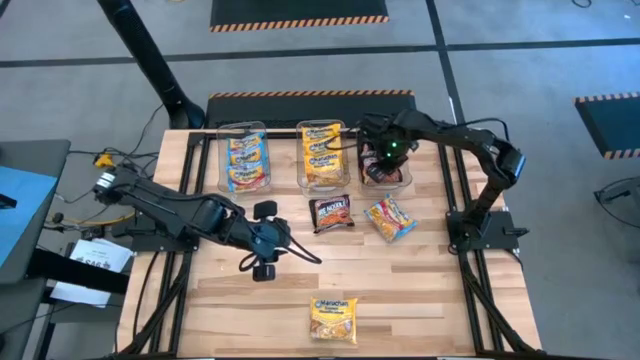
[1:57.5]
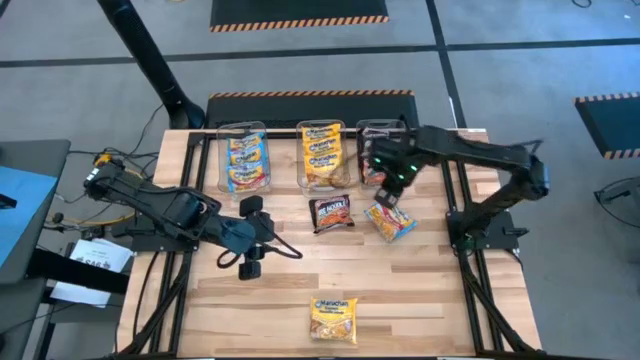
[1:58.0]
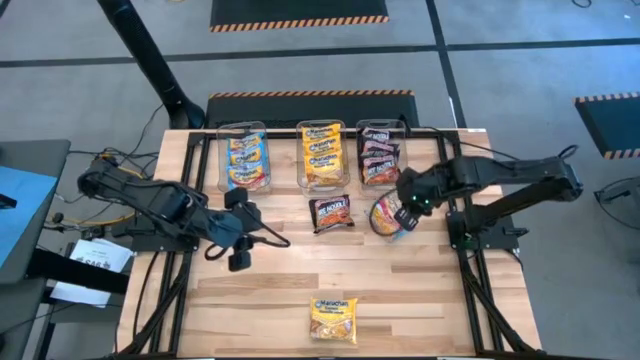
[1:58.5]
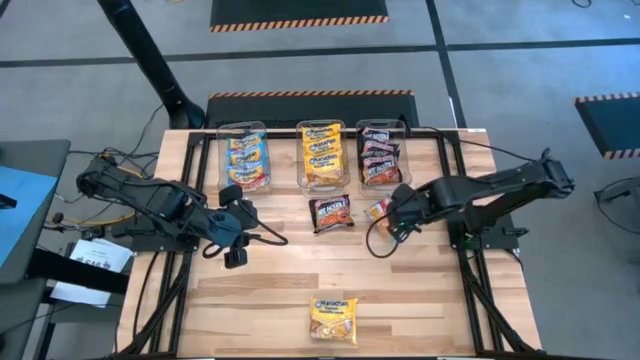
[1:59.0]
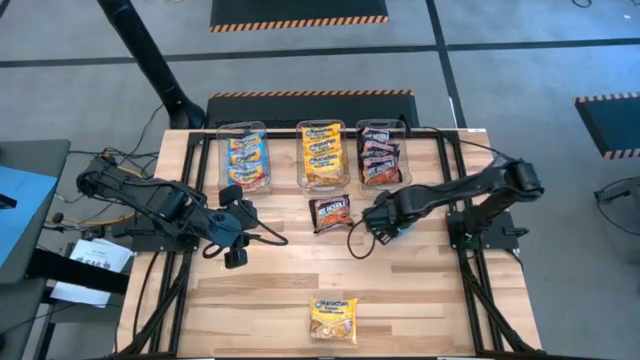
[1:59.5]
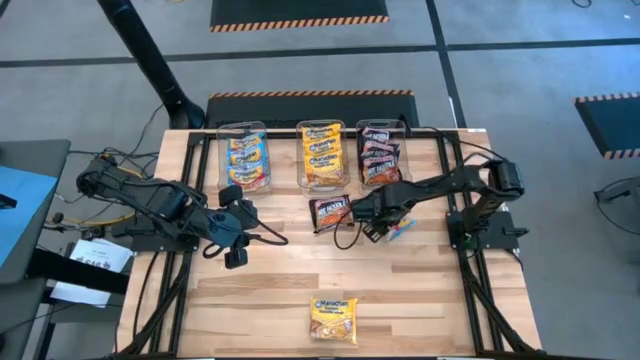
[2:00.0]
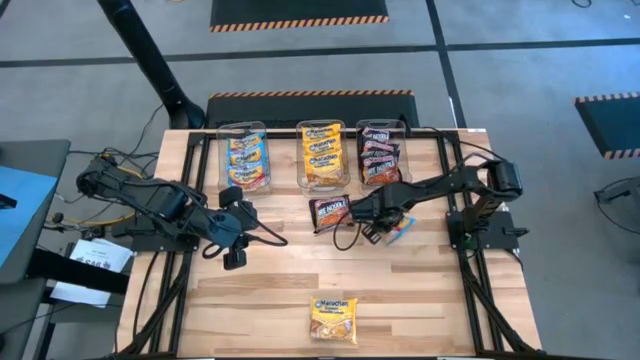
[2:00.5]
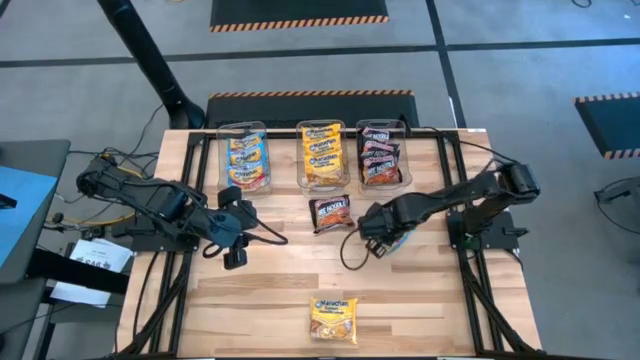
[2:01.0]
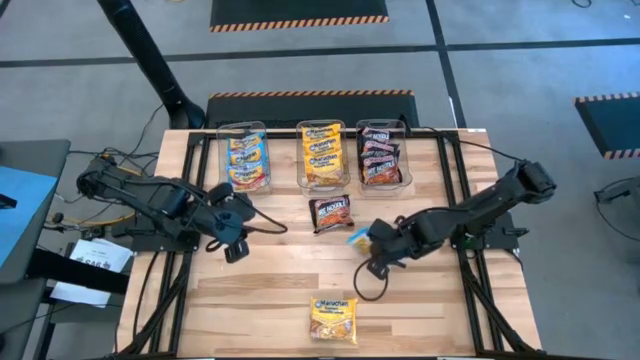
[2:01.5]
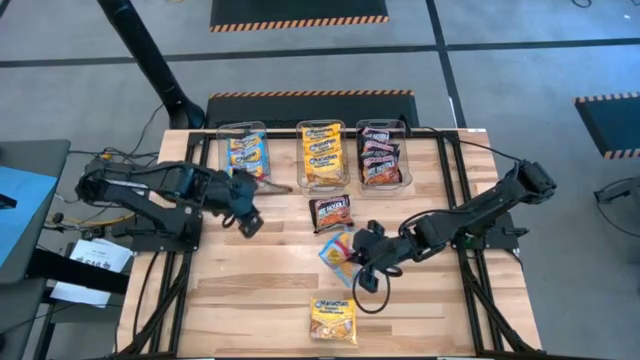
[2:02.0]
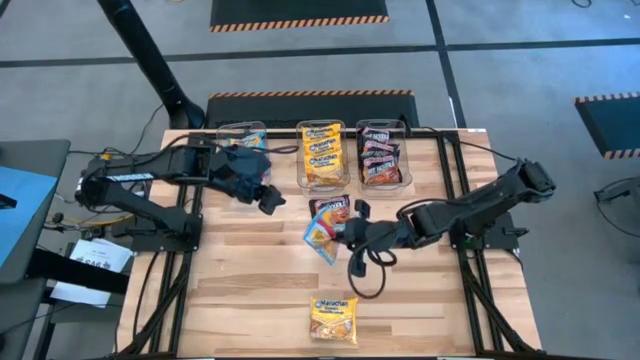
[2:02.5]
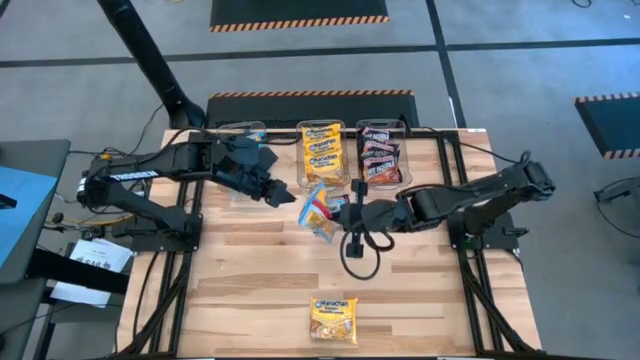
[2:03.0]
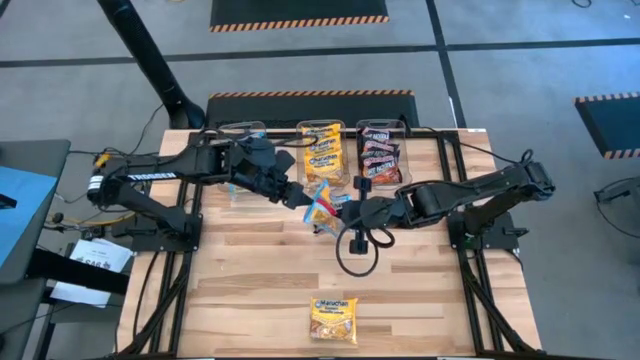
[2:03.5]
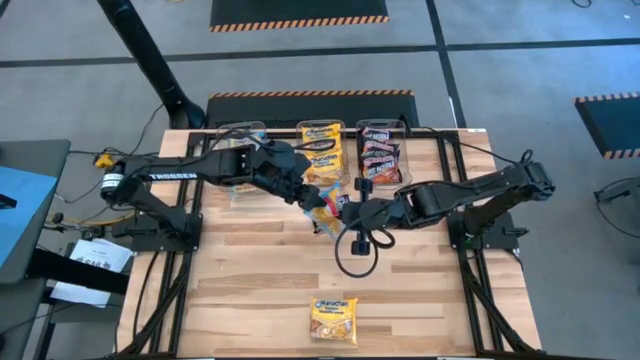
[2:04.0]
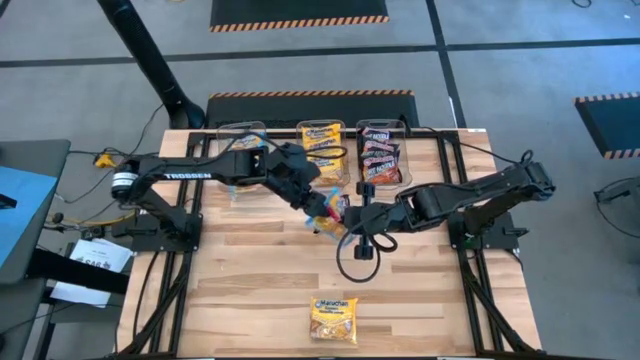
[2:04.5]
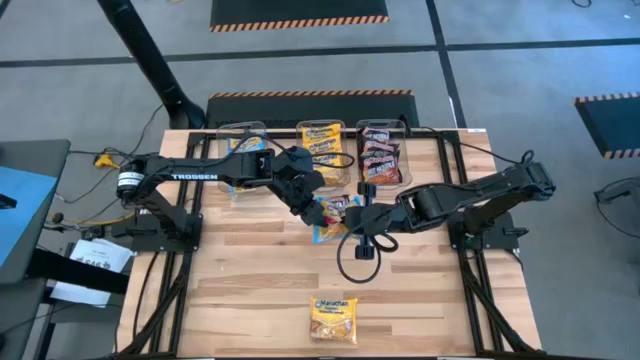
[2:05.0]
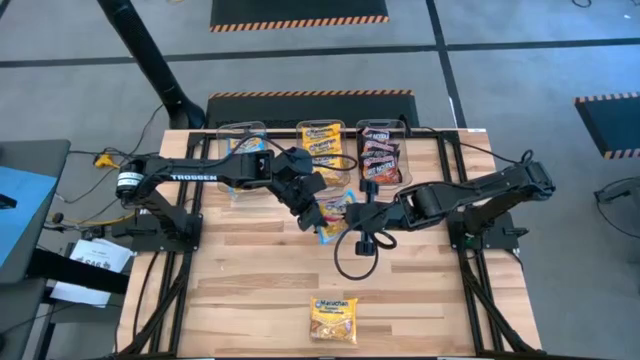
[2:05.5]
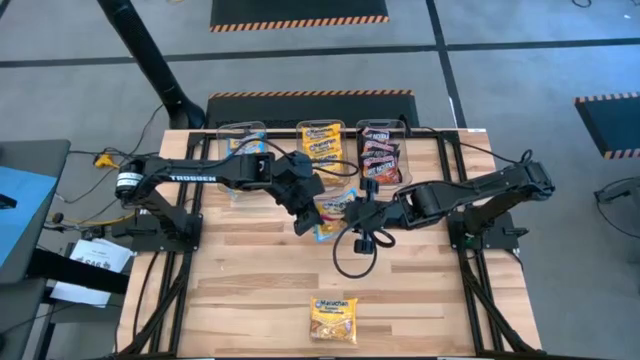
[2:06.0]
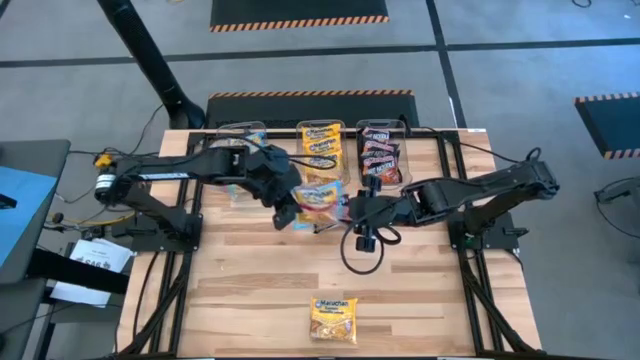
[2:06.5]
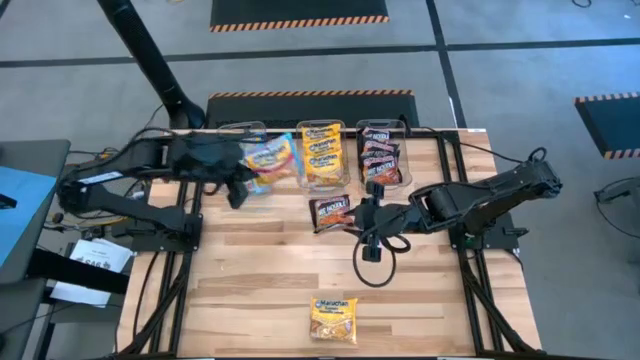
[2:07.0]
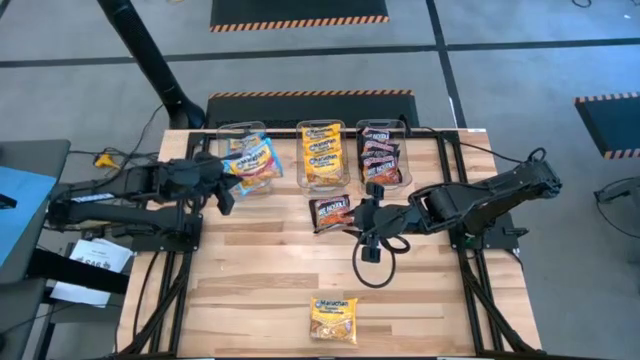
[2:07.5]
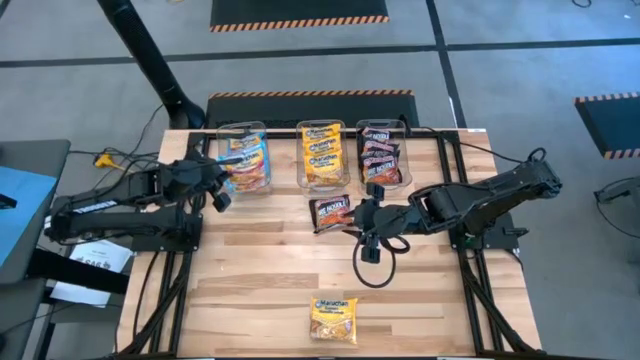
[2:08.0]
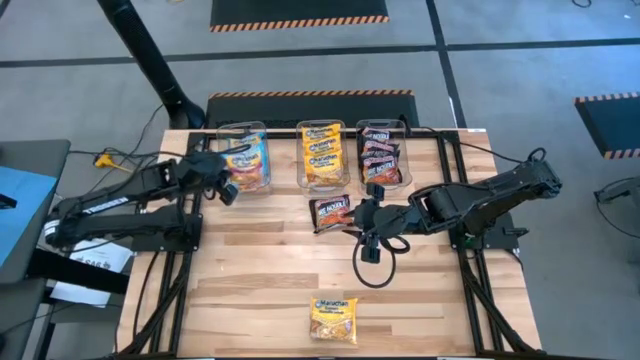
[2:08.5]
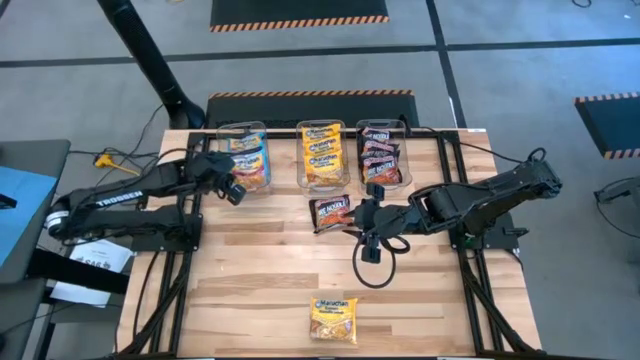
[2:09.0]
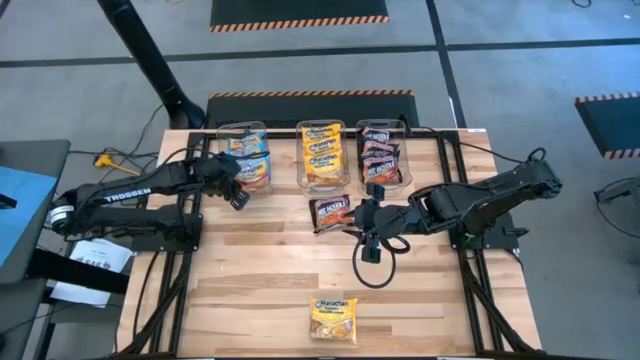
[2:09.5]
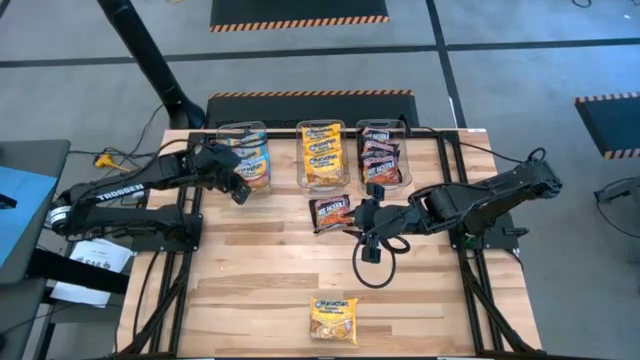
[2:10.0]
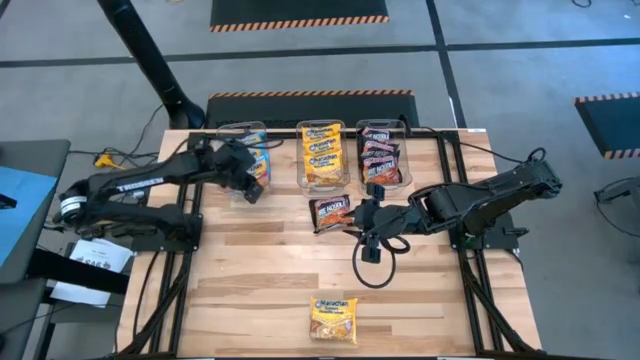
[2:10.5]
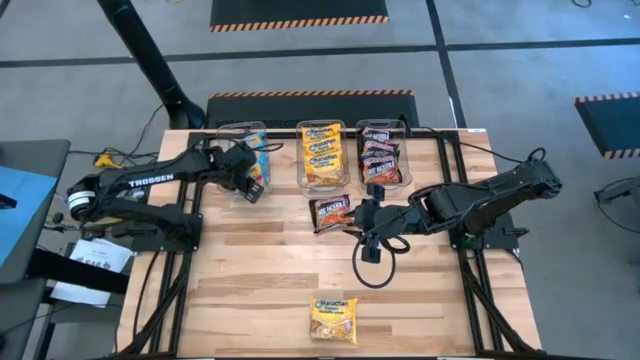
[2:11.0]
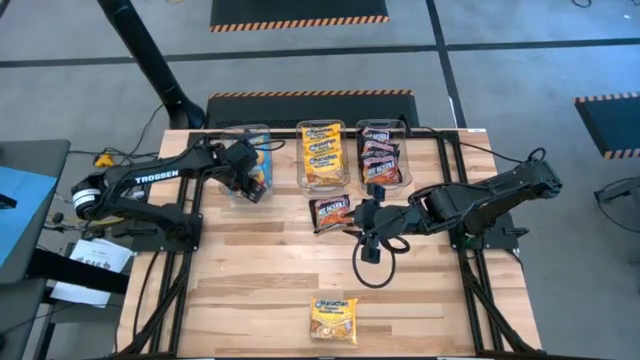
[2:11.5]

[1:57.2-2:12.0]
Task: Sort Maruchan noodles
Put the blue noodle pack into the left transparent bin

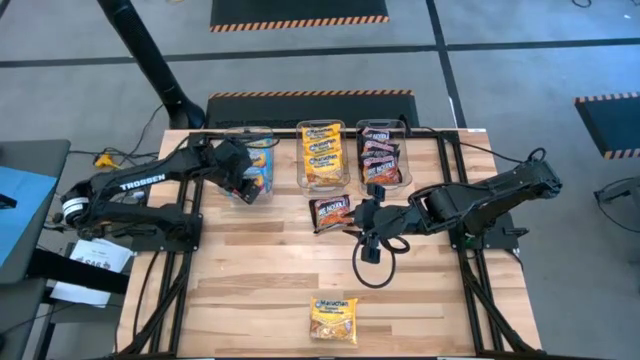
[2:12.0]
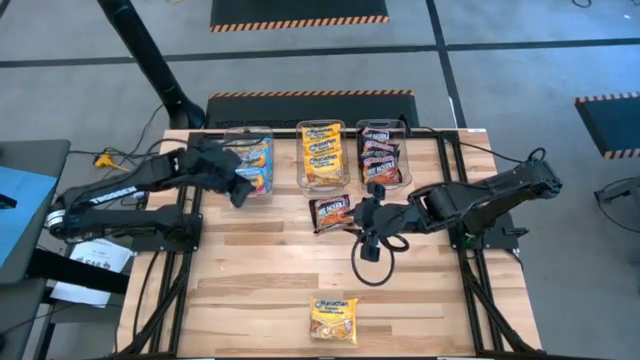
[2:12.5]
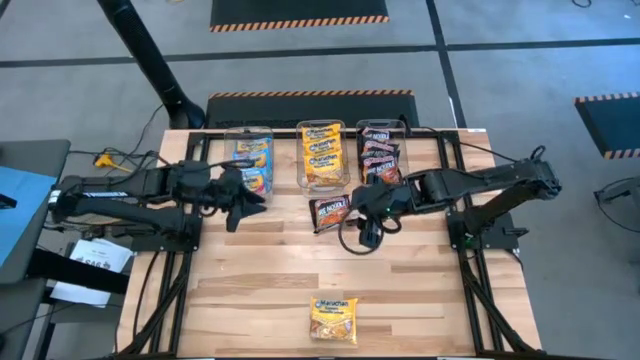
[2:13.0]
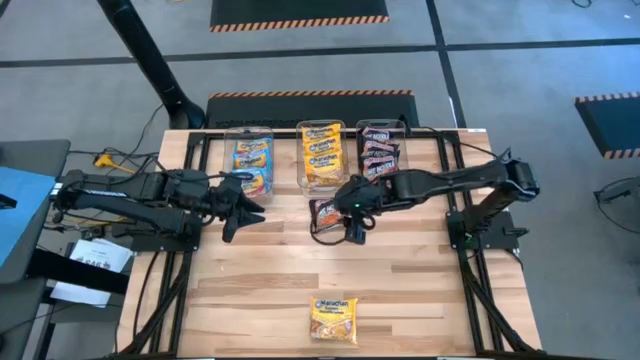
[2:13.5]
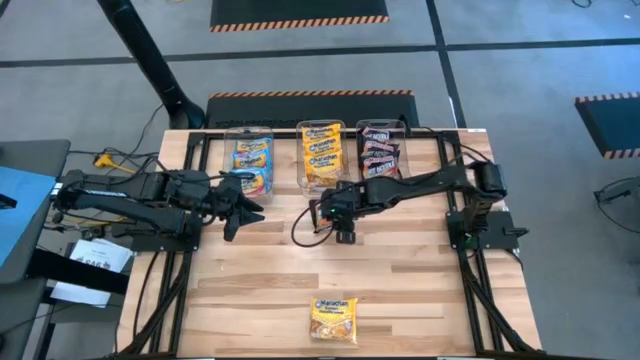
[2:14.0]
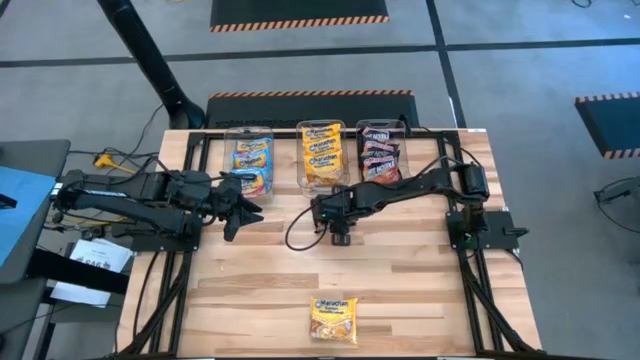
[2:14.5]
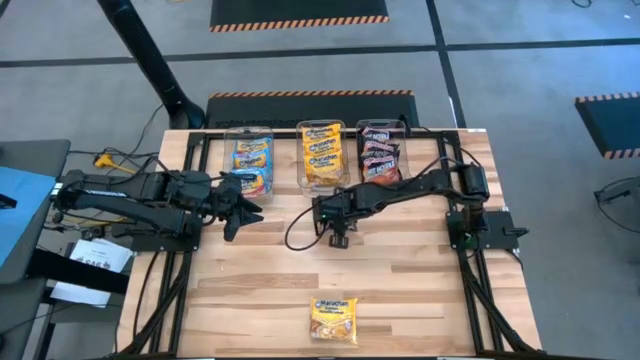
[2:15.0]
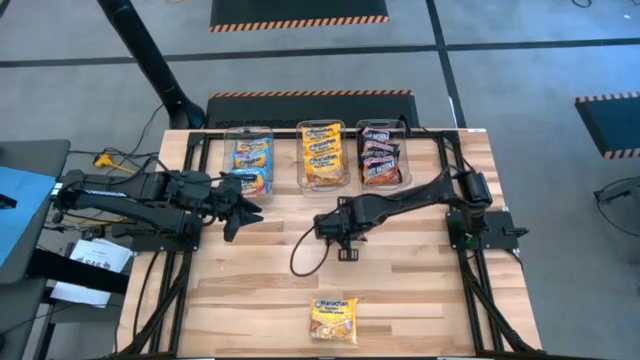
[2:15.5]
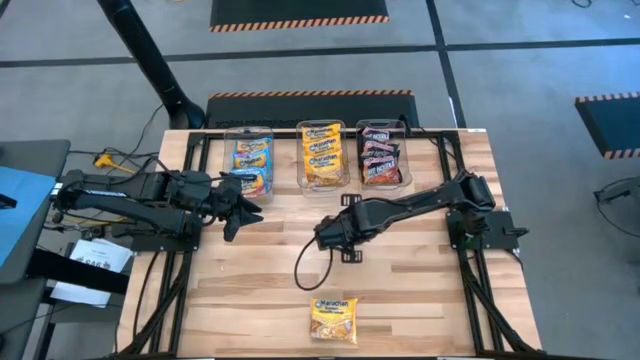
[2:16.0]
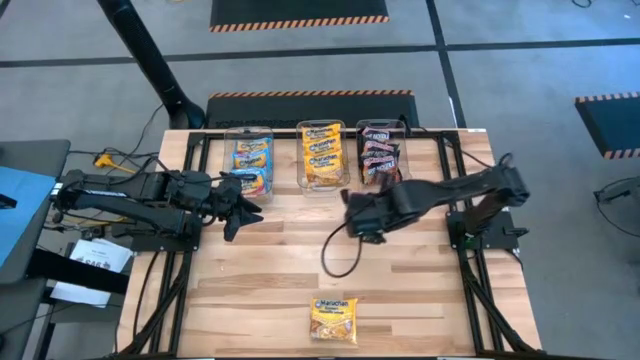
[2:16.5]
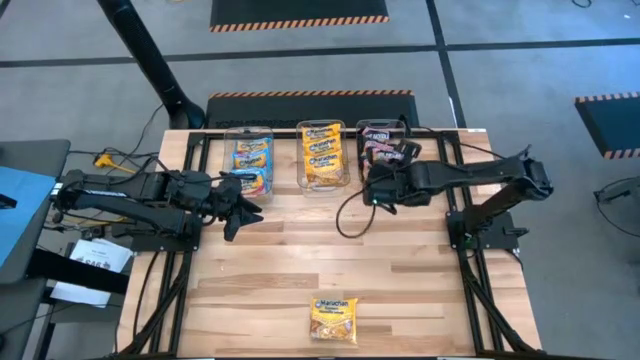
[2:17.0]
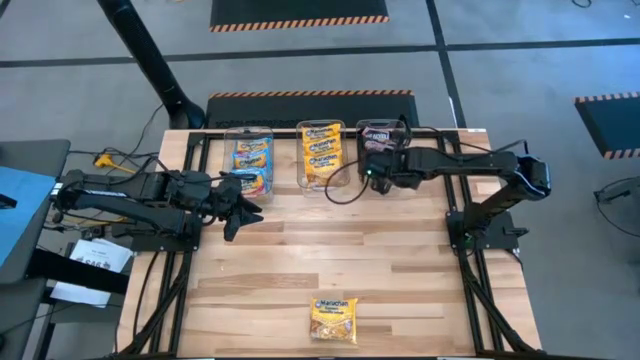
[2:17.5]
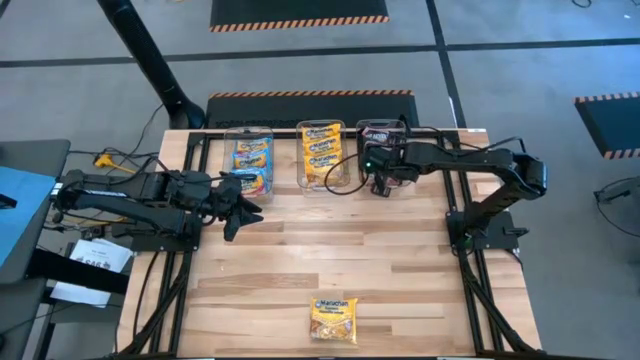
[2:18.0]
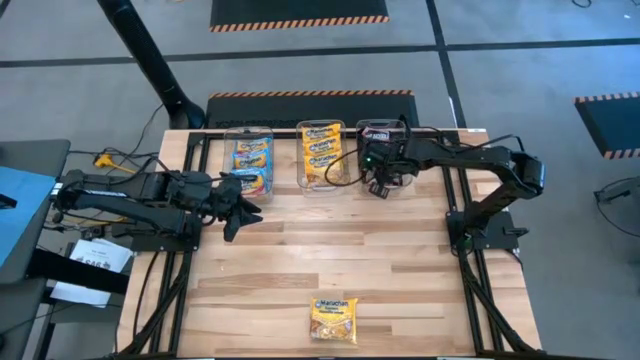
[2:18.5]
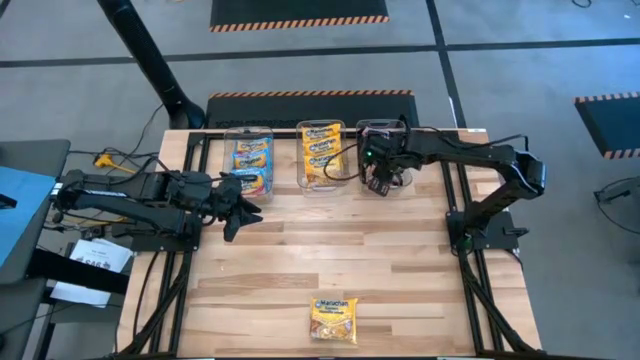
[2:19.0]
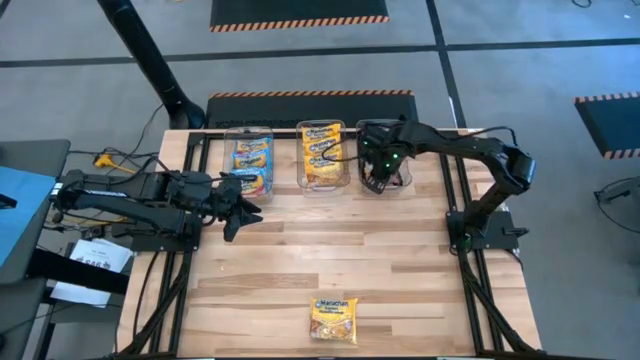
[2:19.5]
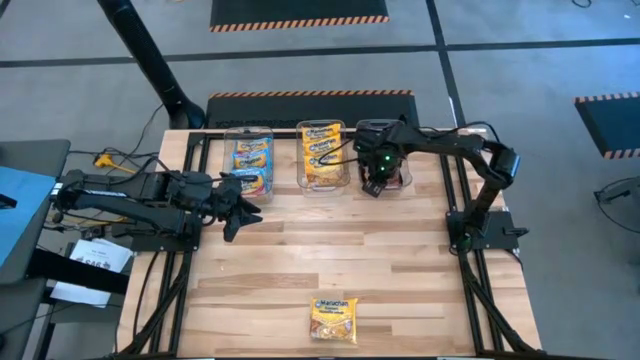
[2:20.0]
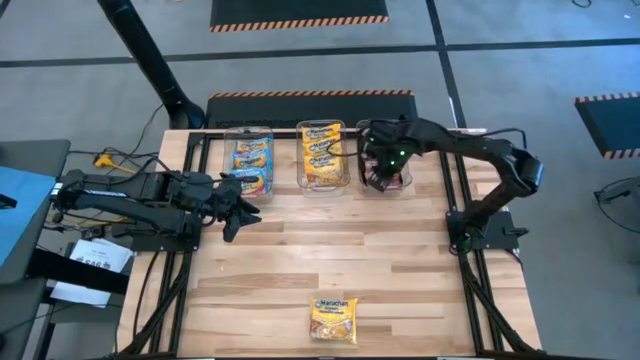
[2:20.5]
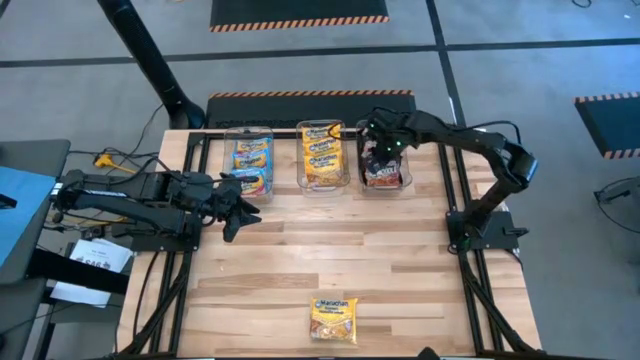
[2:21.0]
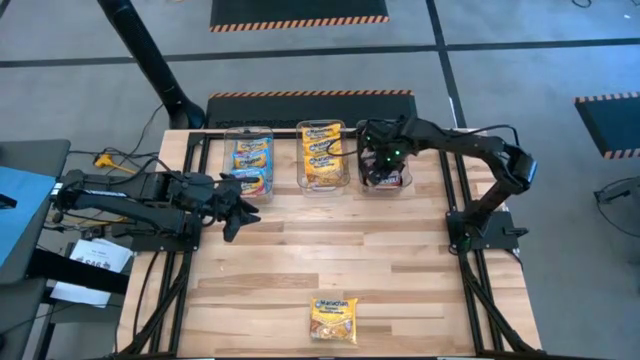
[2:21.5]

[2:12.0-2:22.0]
Put the black noodle pack into the right transparent bin
